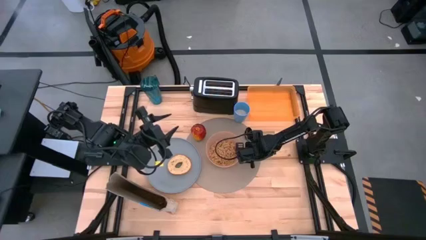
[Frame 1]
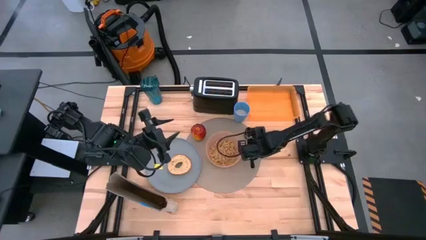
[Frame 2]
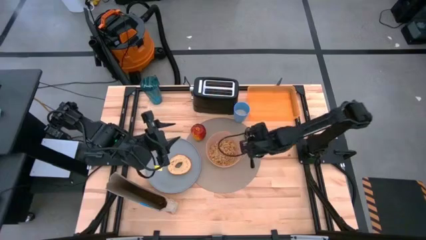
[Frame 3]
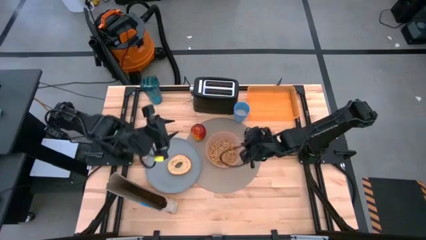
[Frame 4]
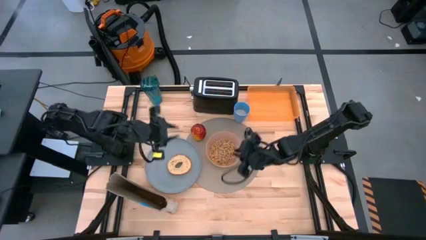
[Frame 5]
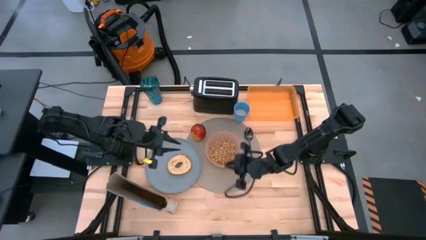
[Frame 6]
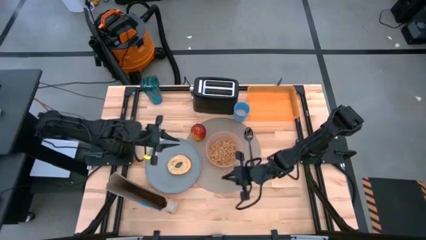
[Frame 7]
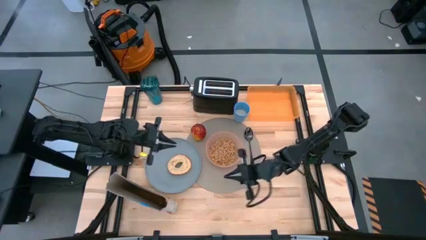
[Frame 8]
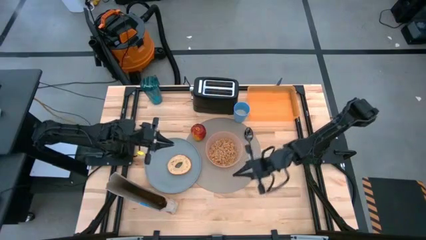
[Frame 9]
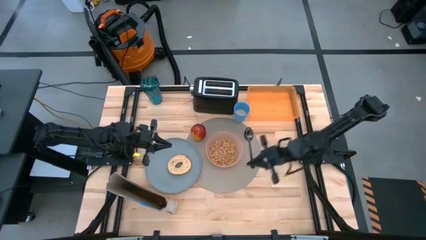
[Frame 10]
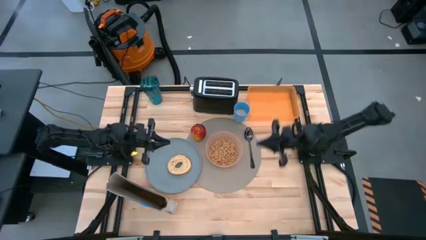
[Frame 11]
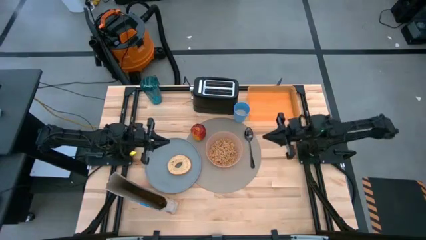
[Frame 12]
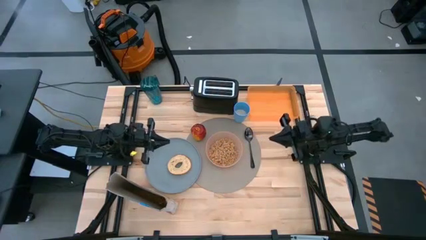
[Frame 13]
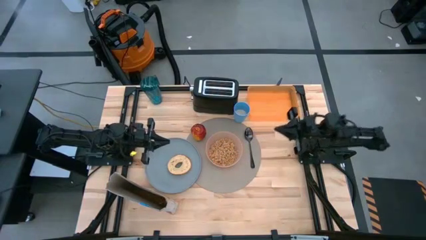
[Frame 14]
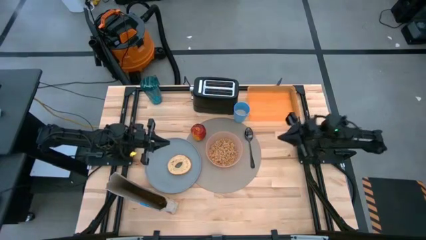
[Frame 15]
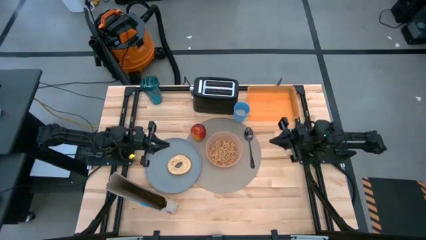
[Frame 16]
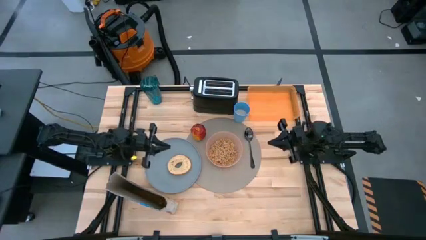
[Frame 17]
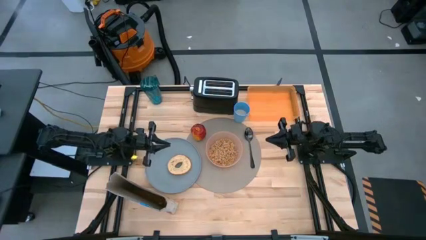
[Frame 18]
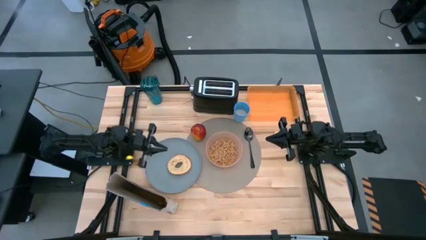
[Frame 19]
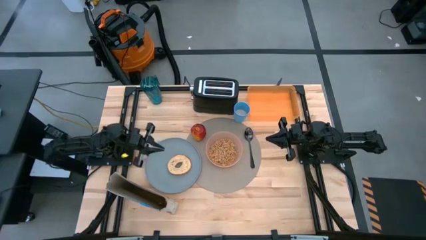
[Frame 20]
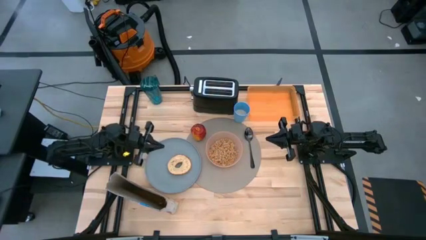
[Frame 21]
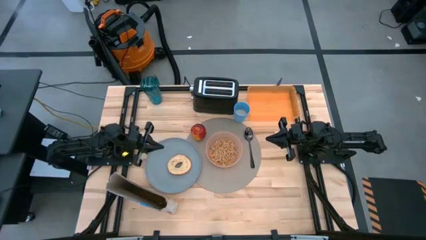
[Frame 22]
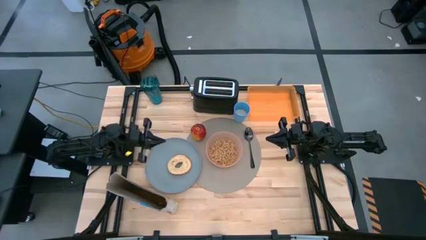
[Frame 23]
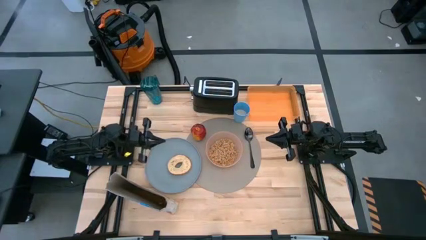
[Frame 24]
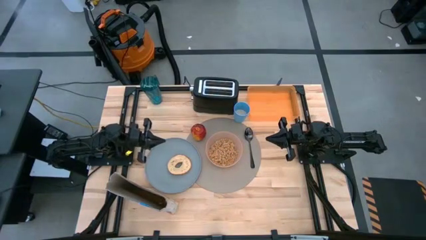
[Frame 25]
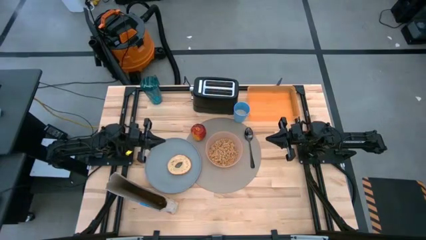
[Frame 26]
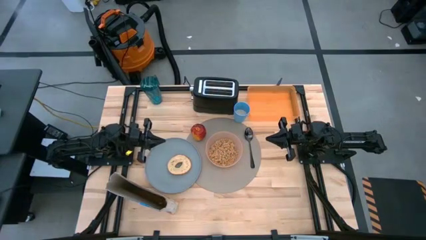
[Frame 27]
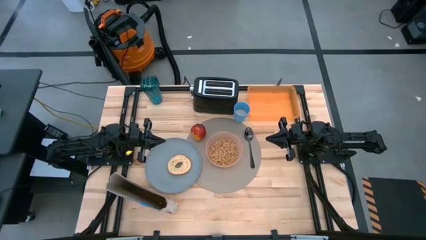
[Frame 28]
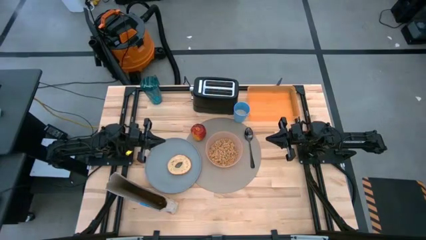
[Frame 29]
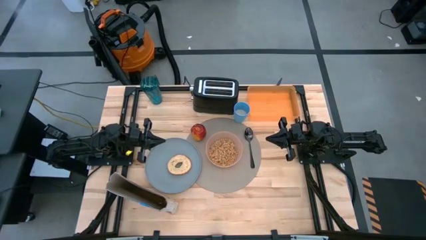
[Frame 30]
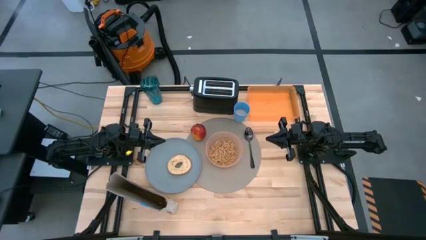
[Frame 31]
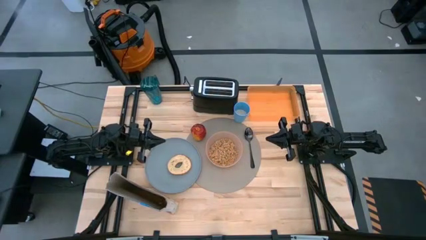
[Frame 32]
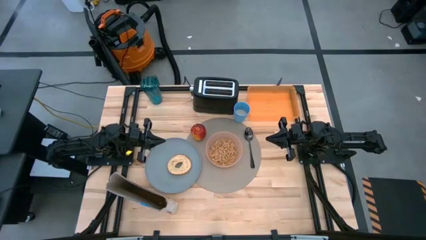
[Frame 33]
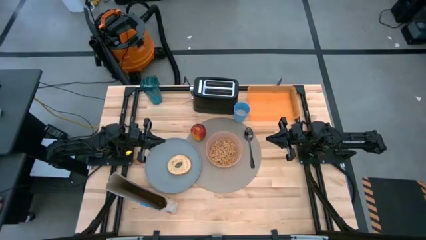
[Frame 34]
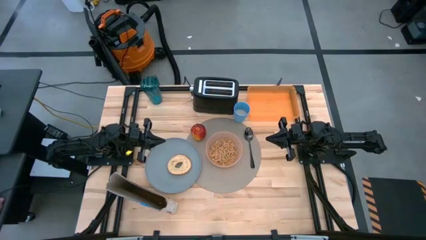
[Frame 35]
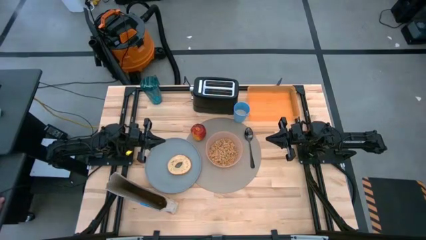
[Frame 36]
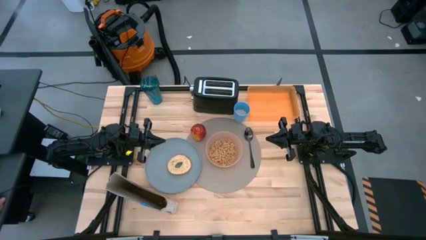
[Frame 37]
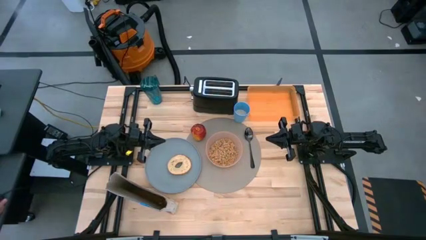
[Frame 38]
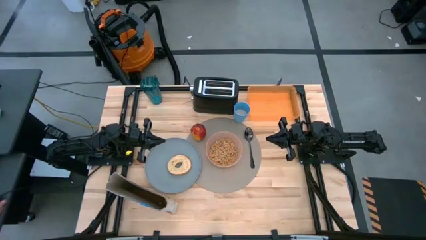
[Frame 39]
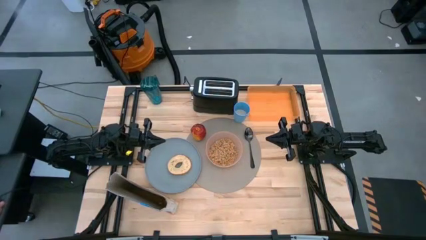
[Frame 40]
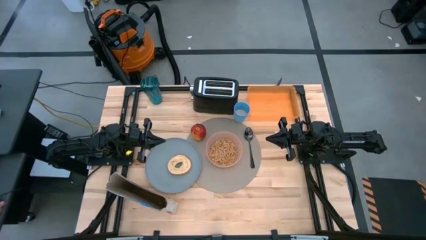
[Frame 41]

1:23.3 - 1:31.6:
Task: Arrange a breakfast setting
Return to Home Position

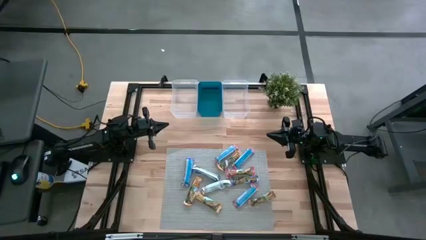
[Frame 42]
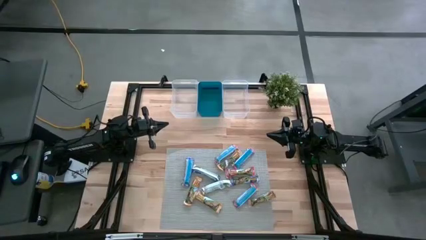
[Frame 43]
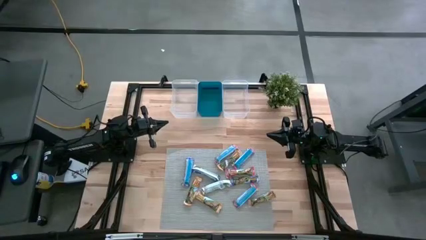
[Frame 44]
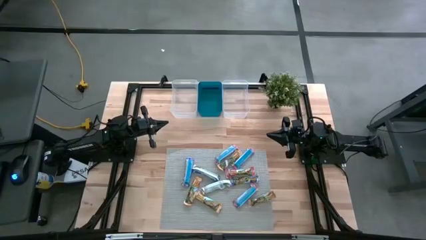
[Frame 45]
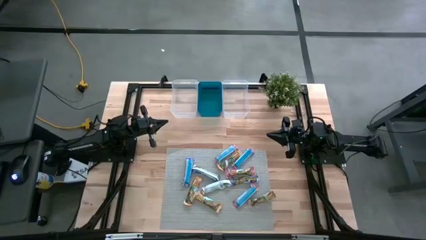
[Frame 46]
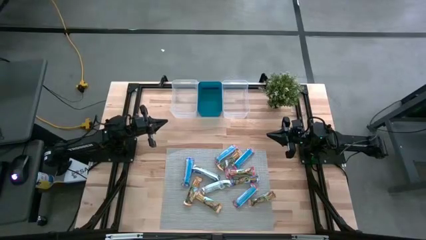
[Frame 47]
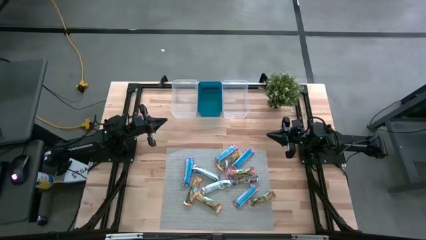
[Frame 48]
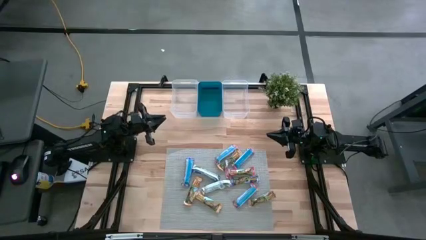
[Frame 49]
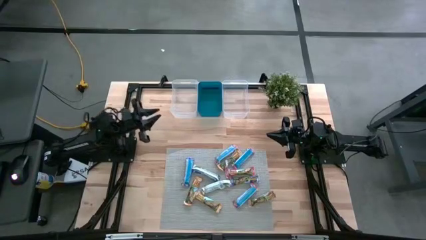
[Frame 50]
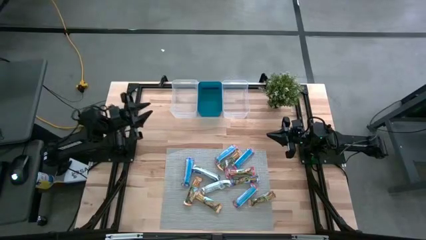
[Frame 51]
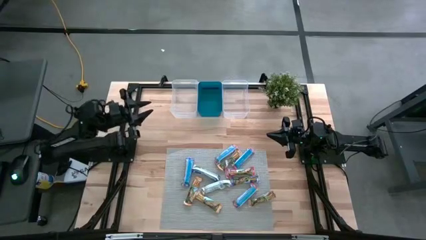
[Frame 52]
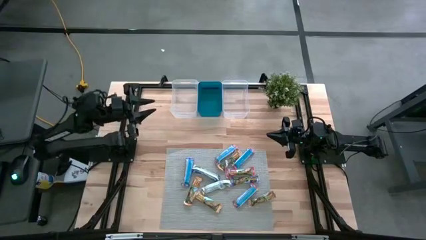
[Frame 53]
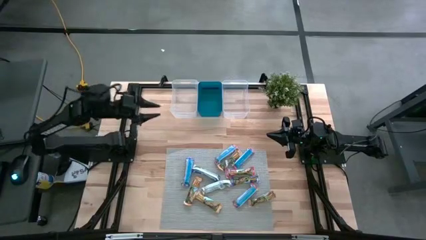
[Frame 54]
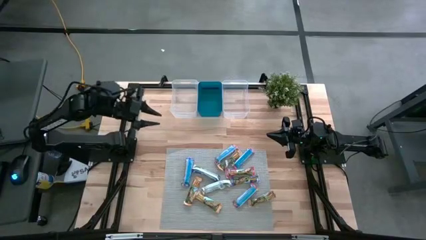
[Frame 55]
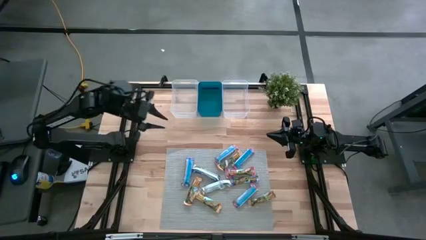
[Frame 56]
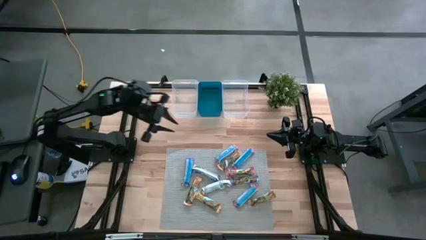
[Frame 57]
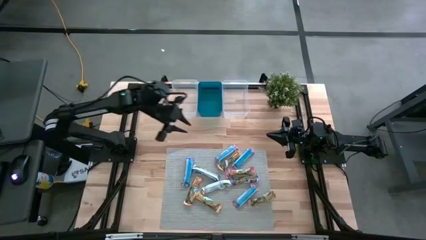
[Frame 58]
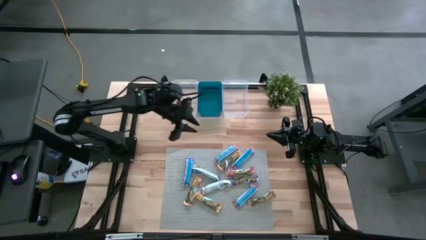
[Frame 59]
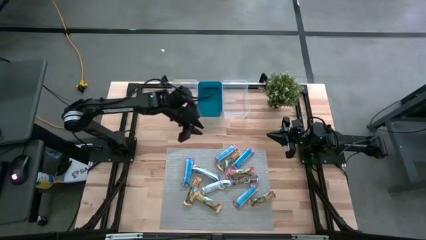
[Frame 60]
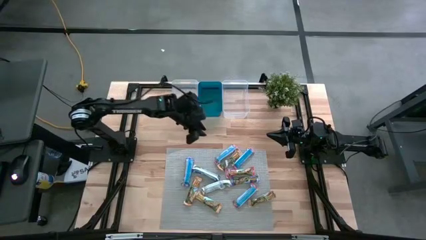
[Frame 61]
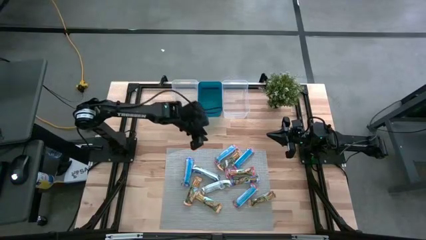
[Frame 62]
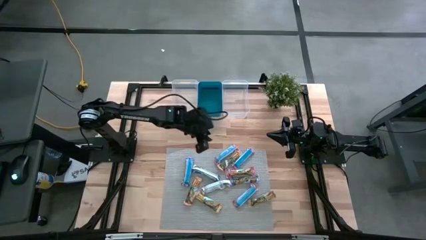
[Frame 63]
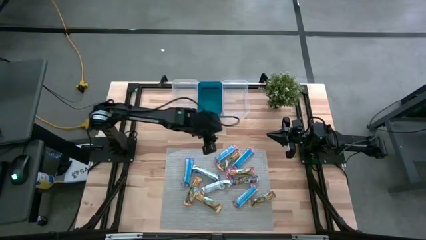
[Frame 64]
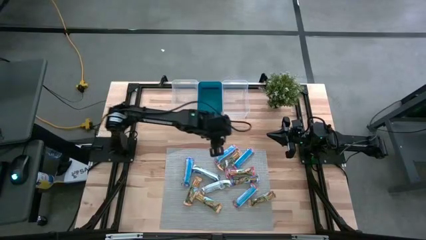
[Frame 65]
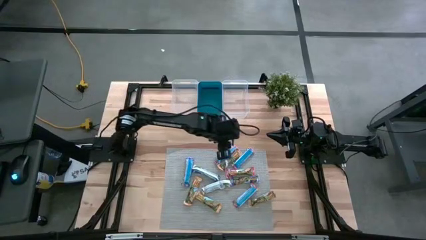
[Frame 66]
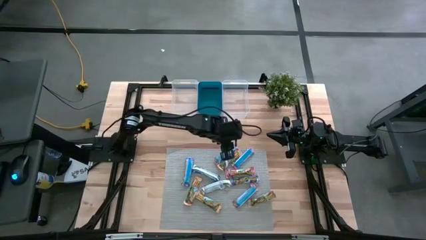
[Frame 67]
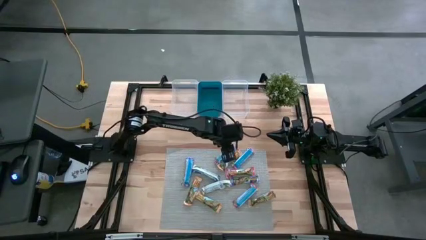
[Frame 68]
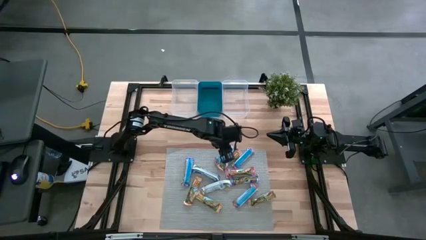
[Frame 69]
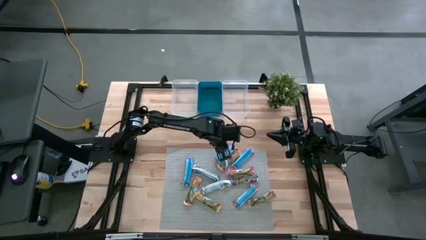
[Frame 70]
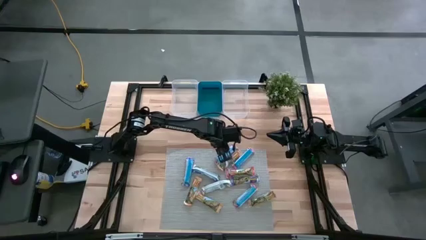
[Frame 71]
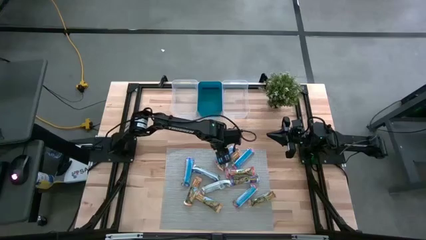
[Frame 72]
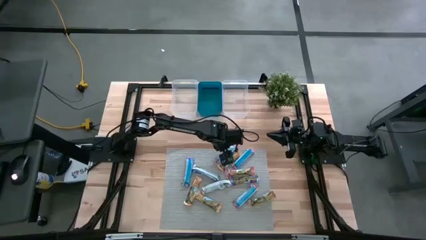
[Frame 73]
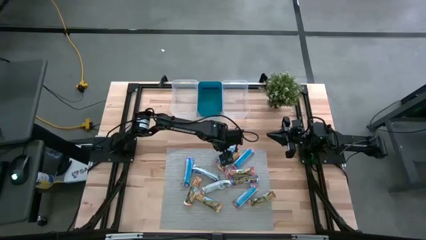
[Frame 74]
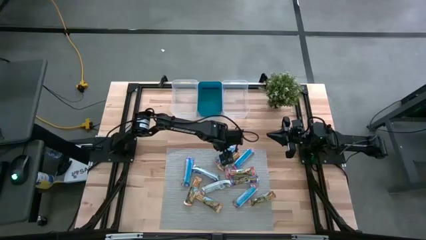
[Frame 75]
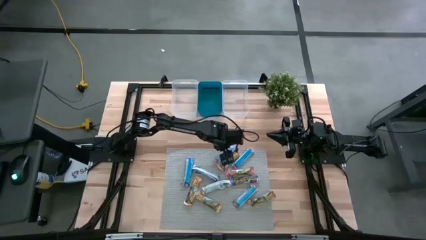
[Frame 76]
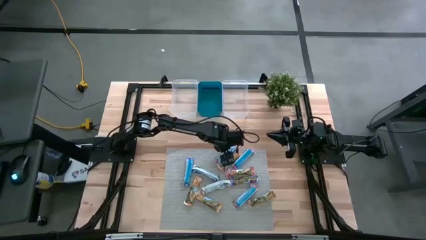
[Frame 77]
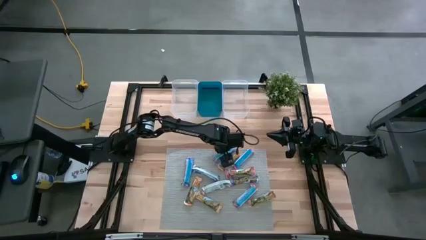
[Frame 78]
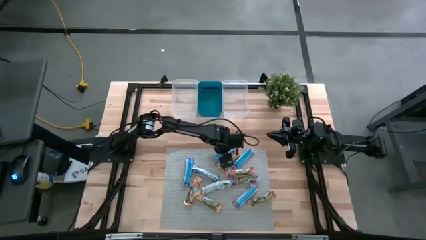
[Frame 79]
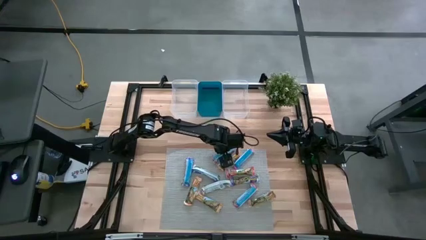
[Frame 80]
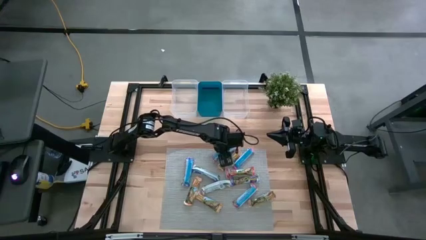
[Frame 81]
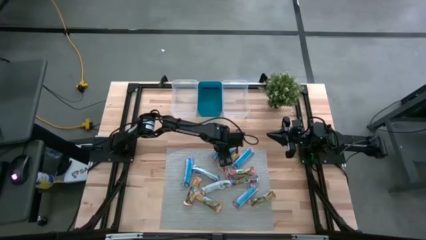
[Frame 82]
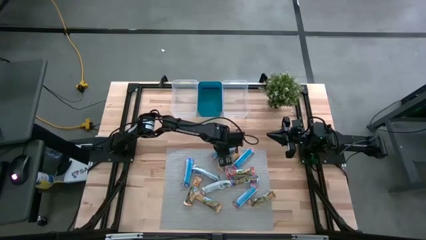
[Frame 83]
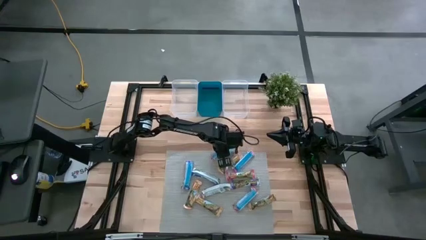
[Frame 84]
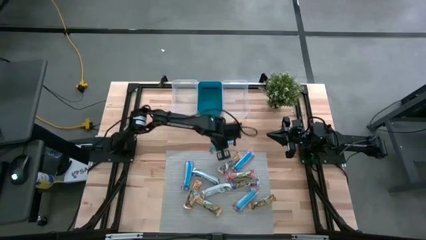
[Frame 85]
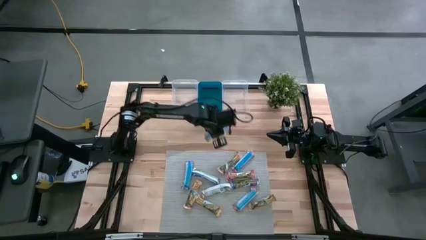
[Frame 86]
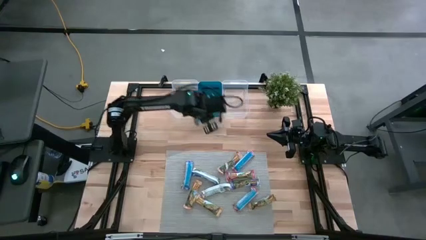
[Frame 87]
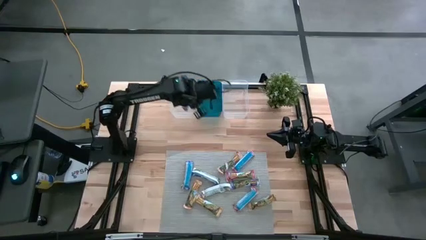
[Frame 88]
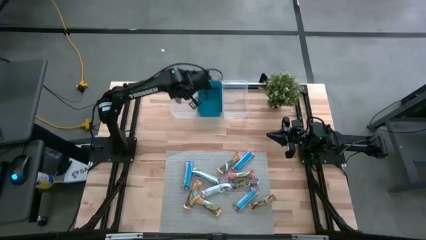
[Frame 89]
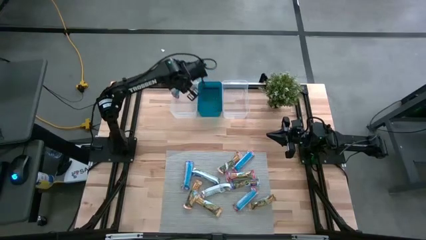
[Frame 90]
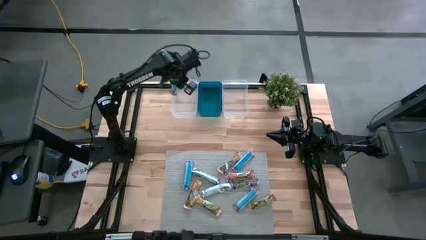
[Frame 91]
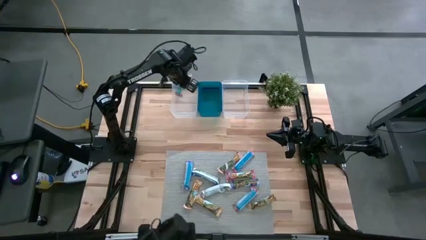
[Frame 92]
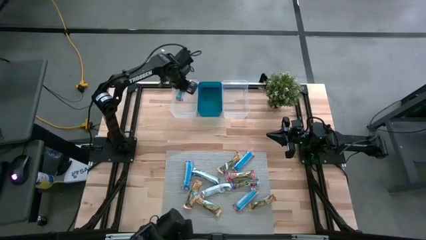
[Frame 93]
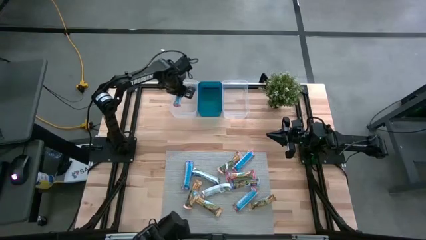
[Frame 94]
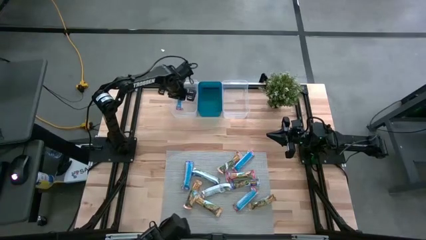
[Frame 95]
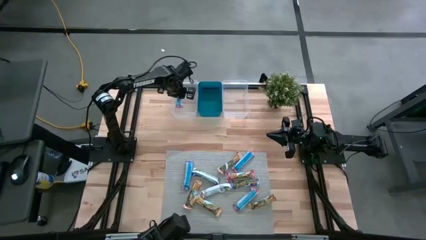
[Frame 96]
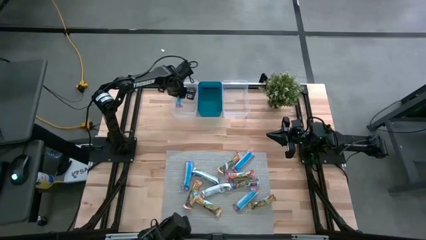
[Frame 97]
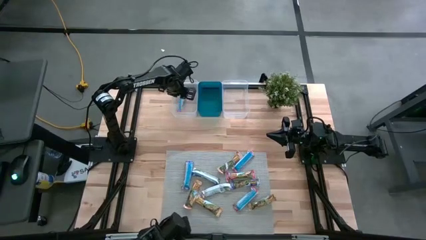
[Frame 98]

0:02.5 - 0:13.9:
Task: Pick and place Granola Bars by type
Put the red granola bar into the left transparent bin
